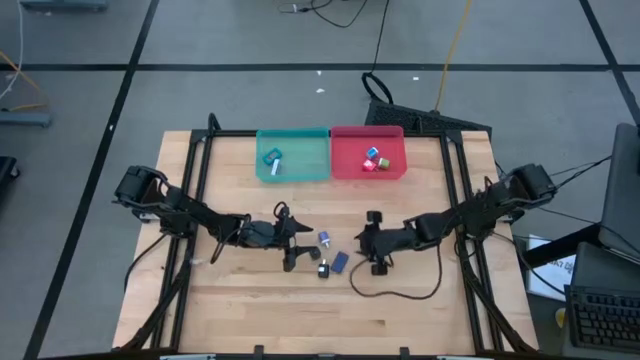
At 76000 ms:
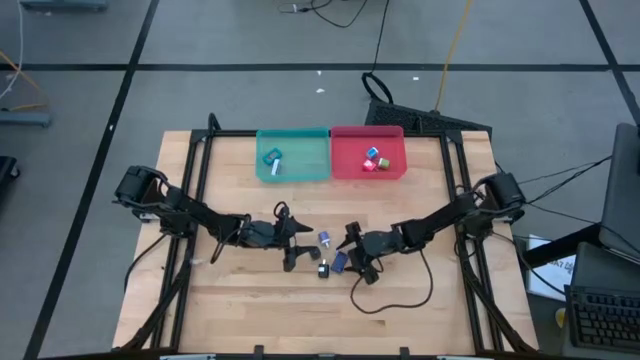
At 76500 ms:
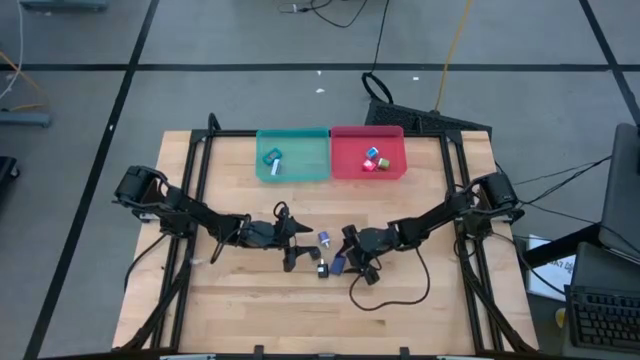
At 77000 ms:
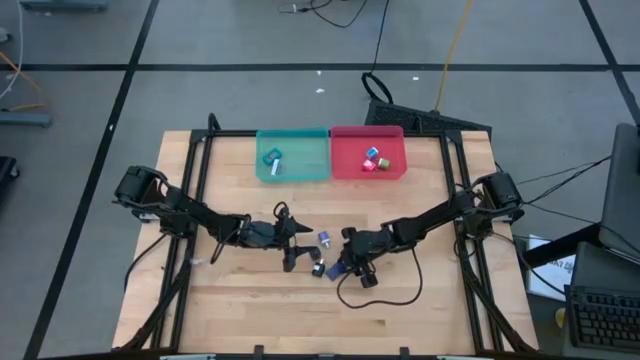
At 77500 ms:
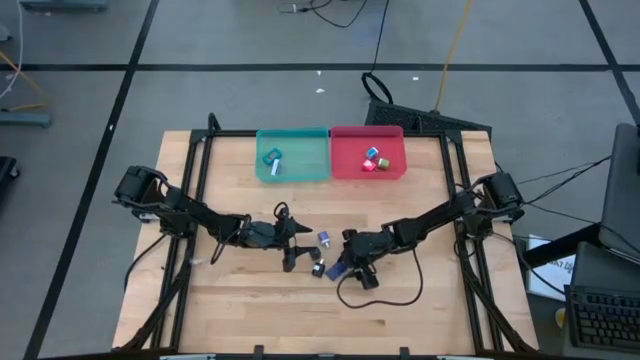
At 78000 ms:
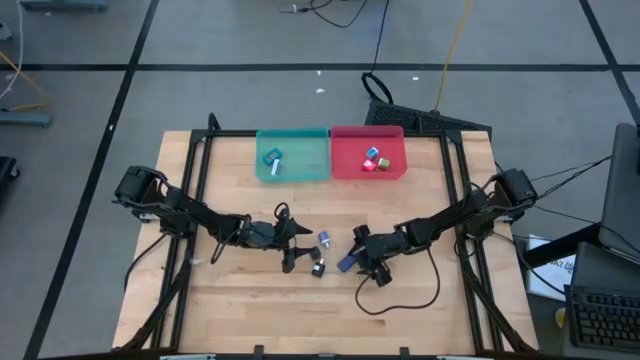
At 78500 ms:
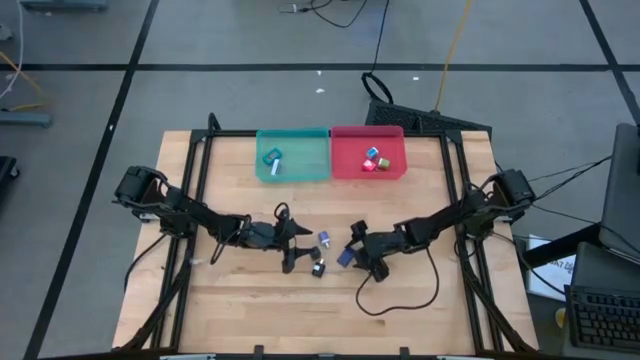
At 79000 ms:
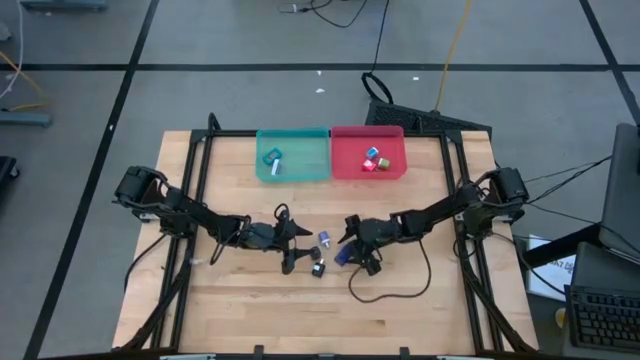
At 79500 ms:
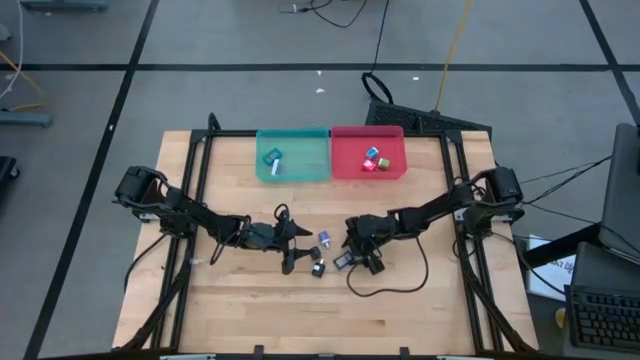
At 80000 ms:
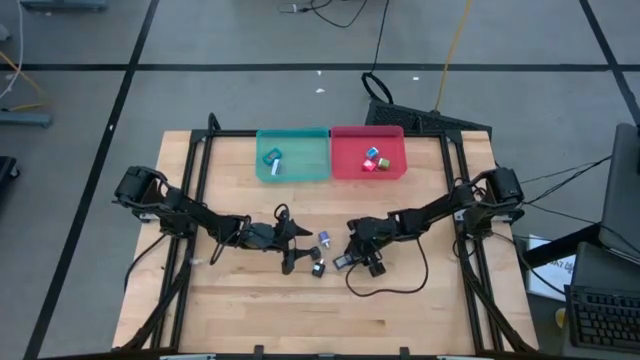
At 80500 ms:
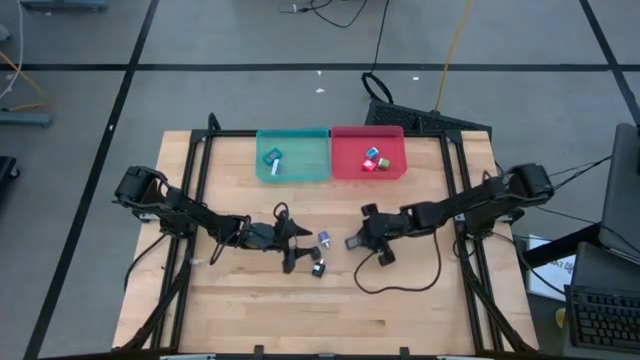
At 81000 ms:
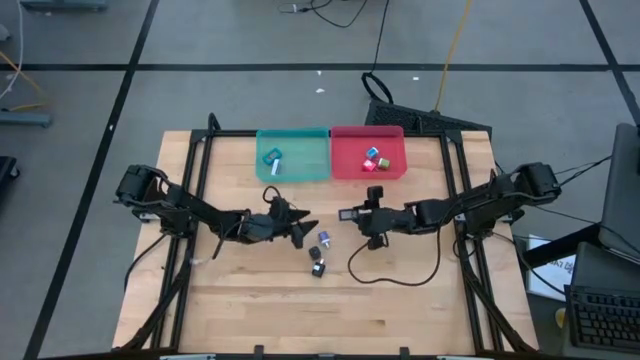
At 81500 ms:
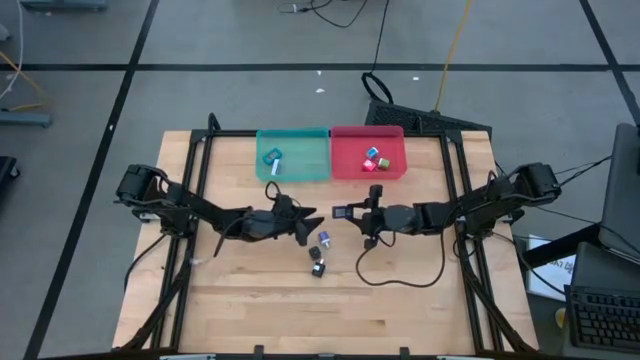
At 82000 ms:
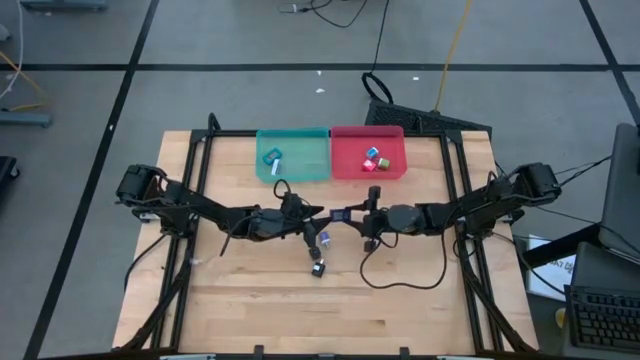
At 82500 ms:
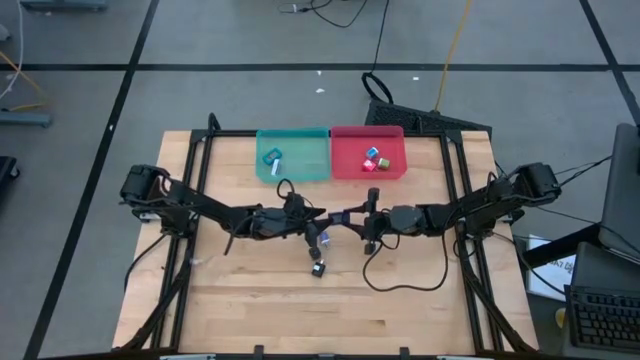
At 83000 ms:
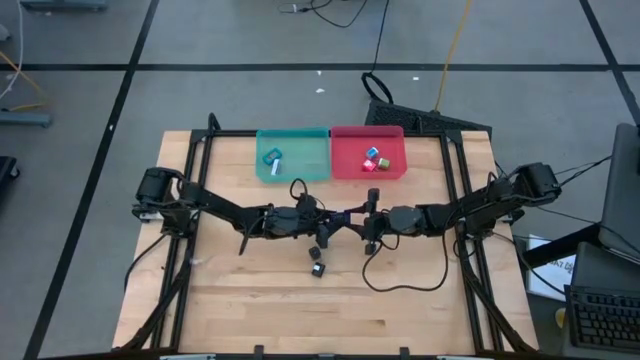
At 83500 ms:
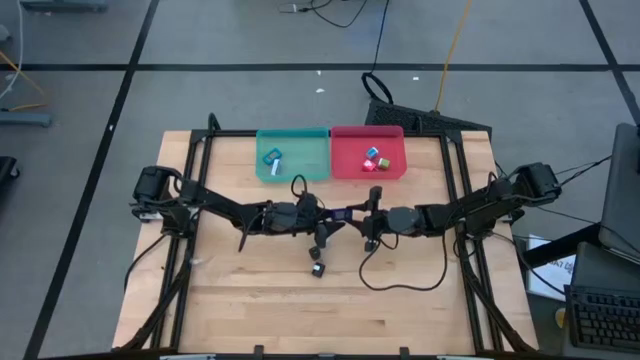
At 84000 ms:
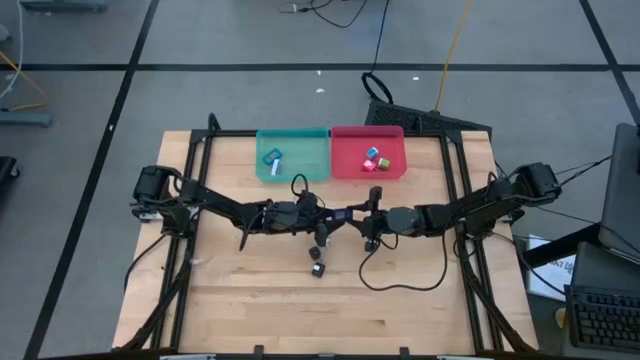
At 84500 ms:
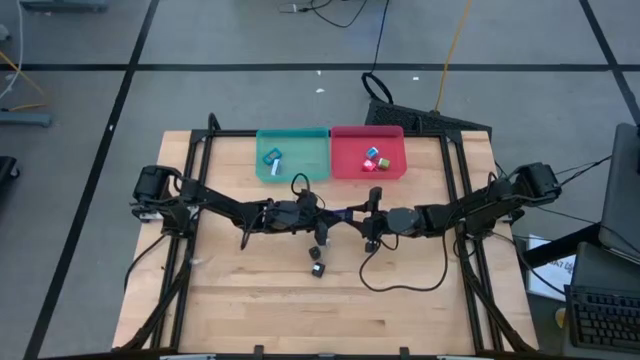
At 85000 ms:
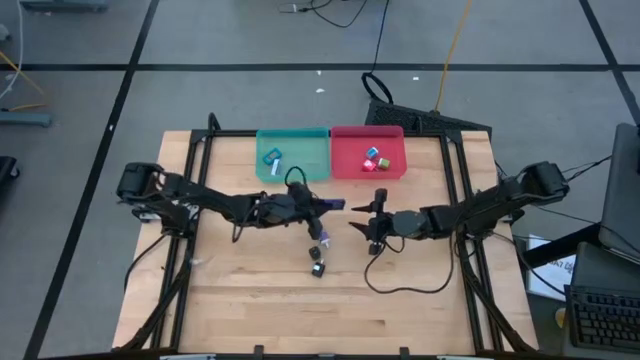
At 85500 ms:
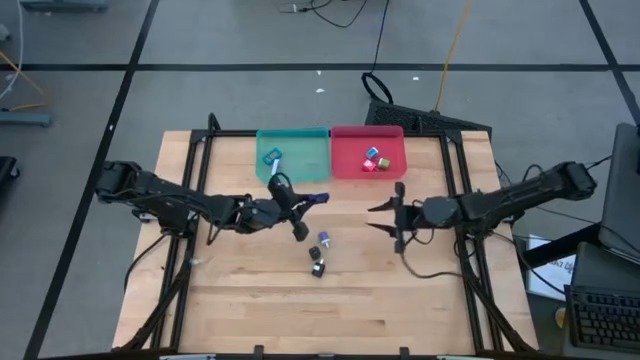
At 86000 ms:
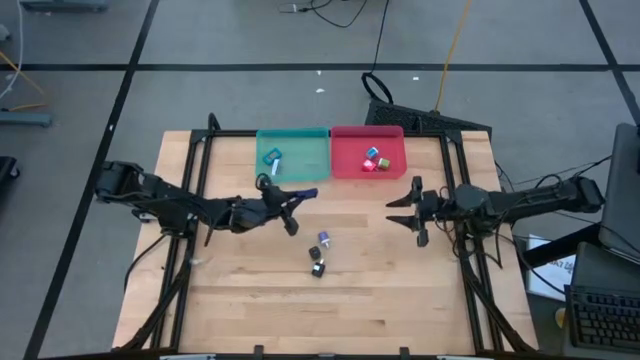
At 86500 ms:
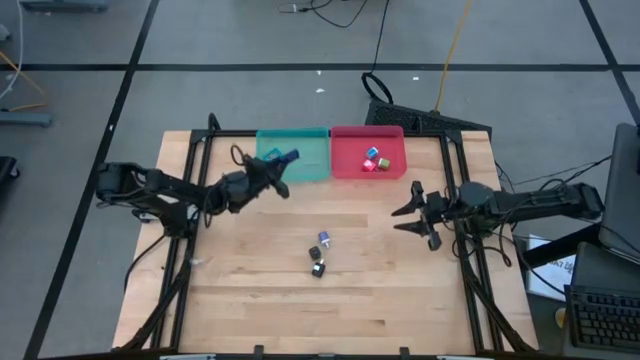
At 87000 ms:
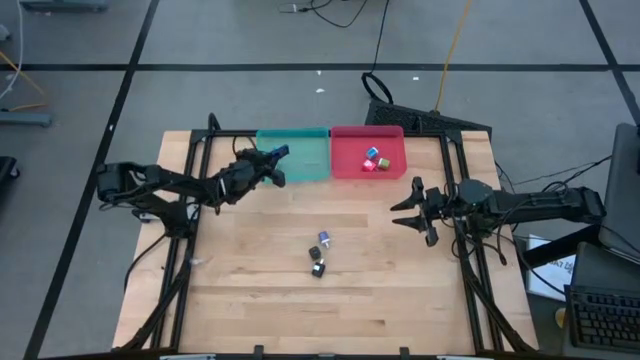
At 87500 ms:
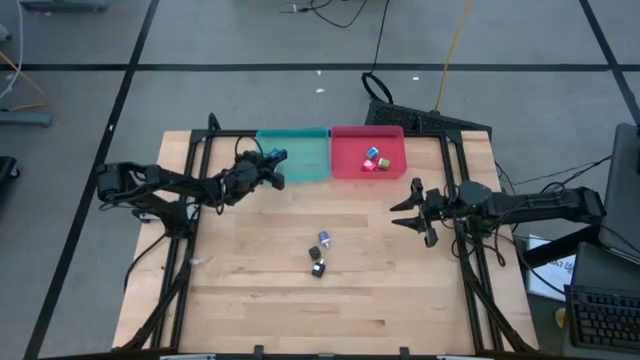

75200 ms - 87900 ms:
Task: Sort charging adapters and watches
Put the blue watch in the blue bin

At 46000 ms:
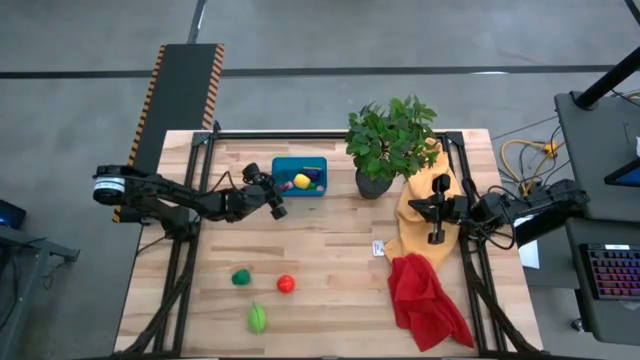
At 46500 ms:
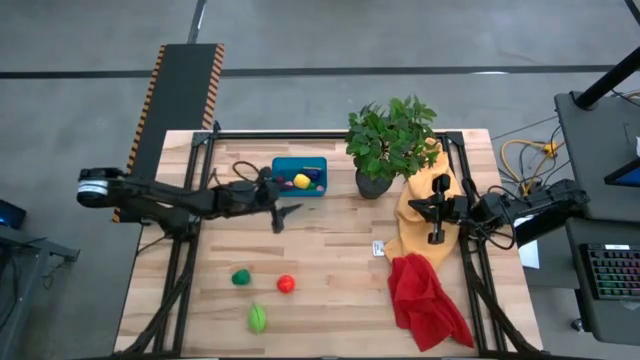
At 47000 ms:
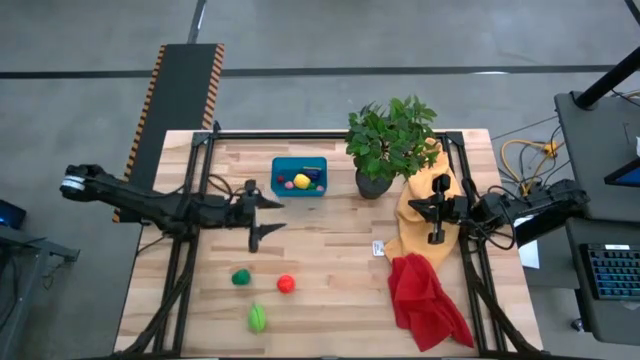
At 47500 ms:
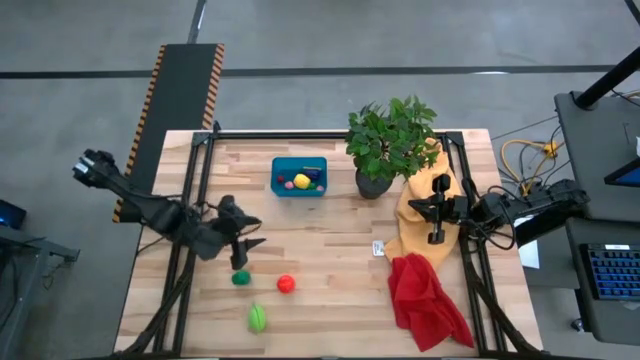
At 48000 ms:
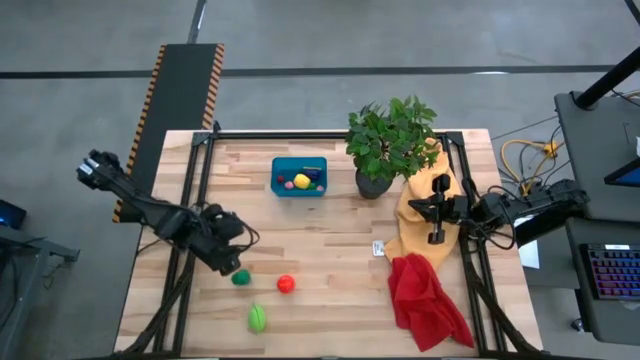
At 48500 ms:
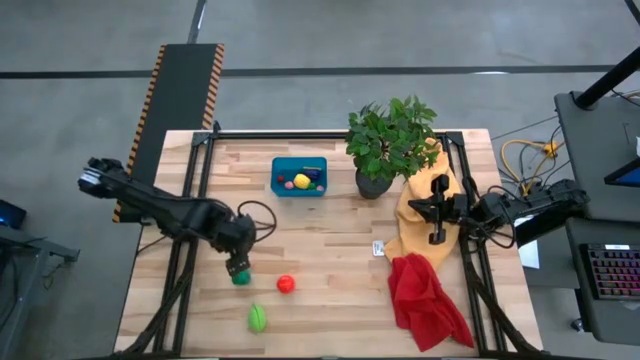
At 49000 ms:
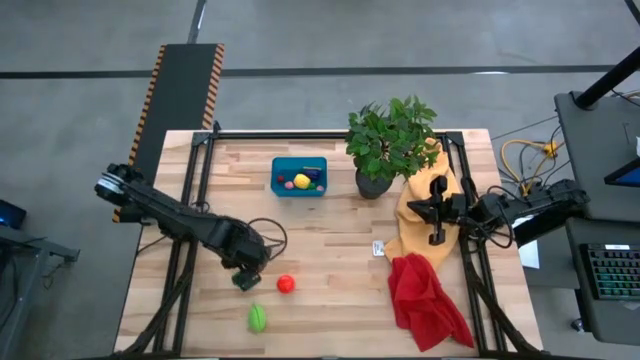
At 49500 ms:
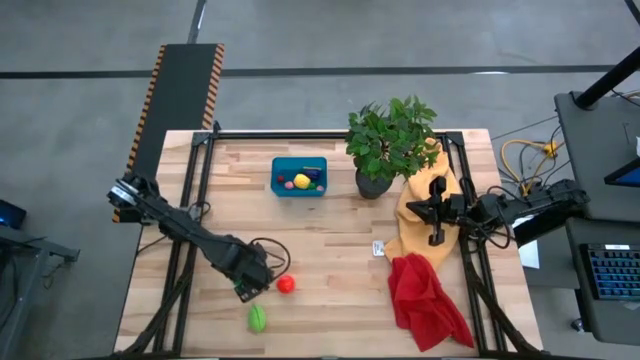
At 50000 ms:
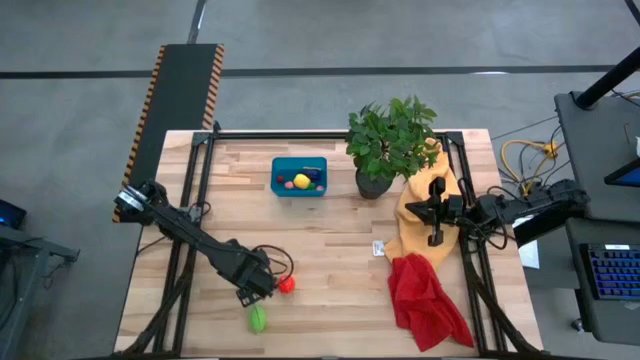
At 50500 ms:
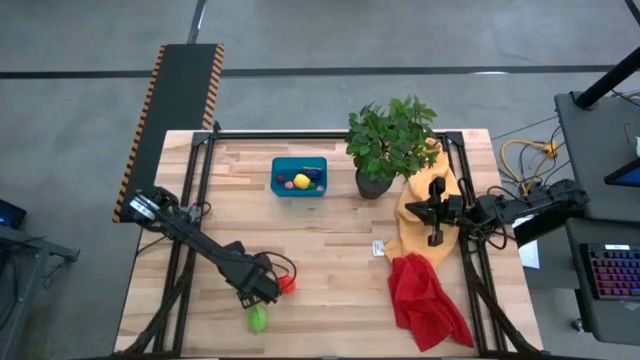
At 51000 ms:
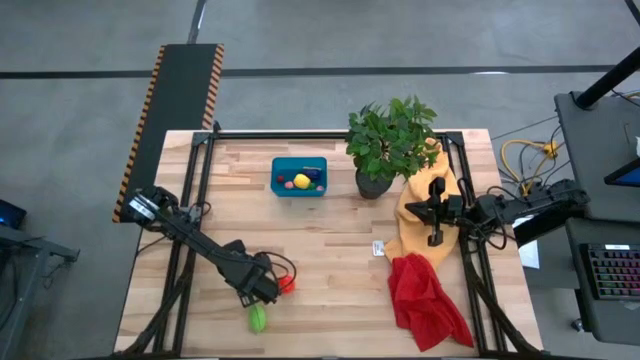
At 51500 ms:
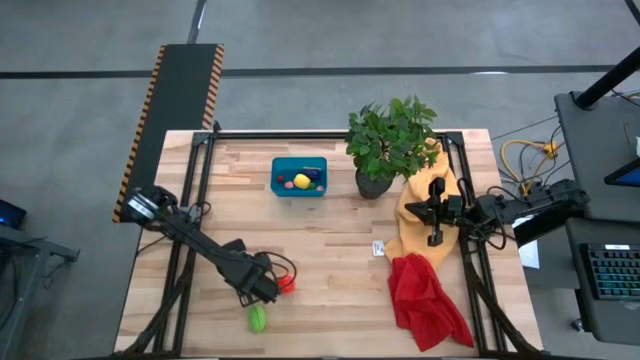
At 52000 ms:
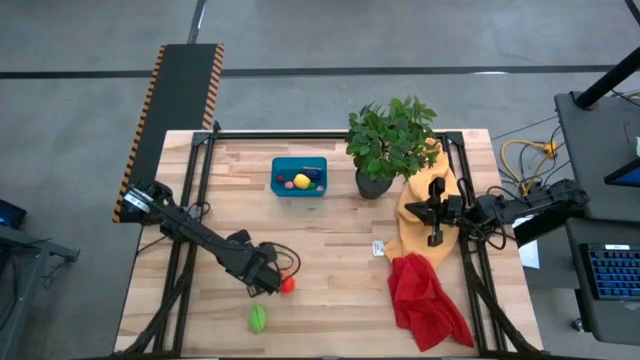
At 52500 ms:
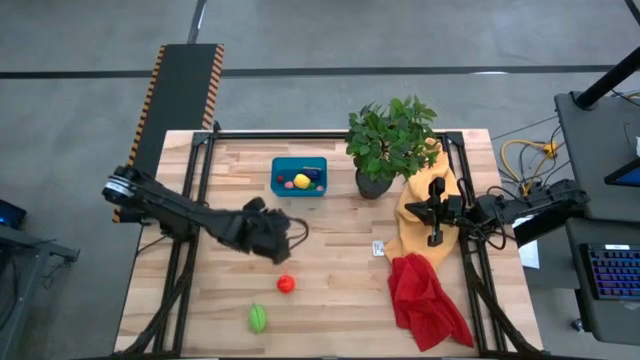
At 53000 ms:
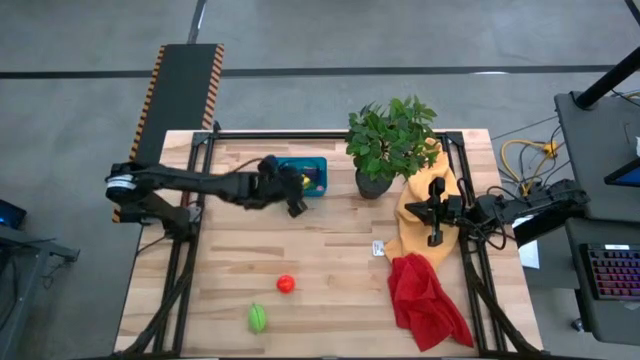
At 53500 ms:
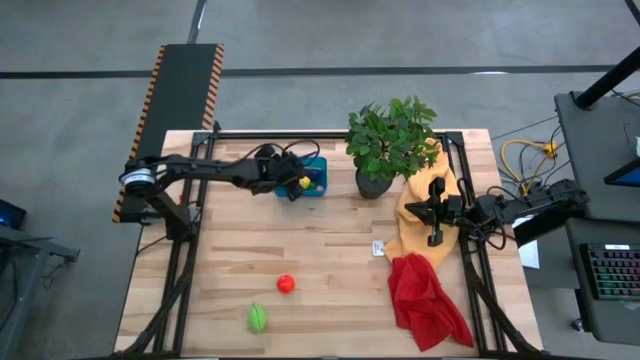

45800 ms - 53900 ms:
Task: Pick and placing Produce into tupperware
Put the bell pepper into the bin
